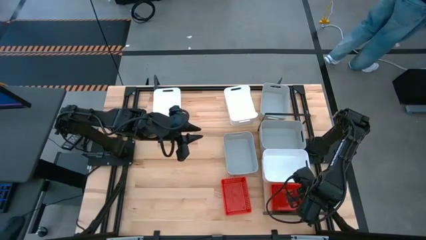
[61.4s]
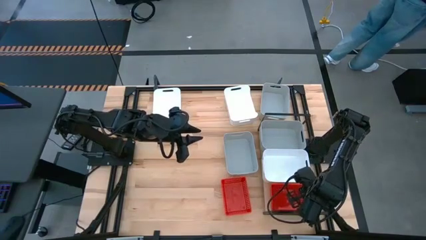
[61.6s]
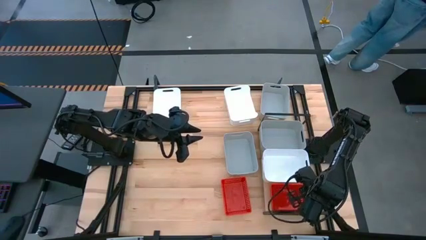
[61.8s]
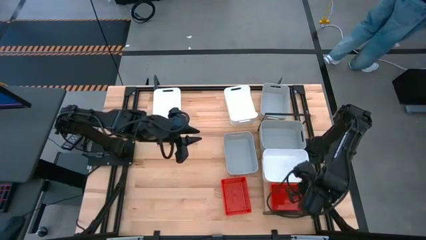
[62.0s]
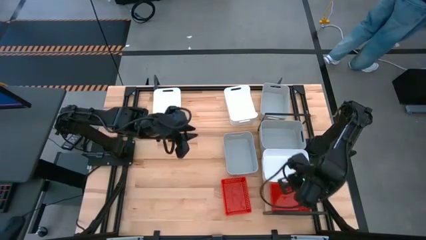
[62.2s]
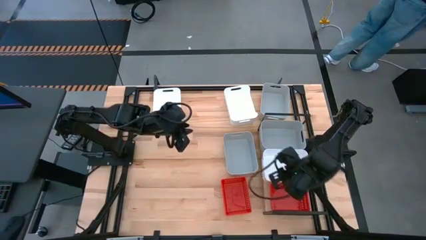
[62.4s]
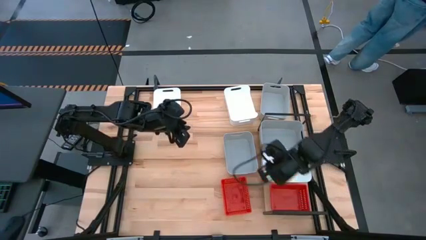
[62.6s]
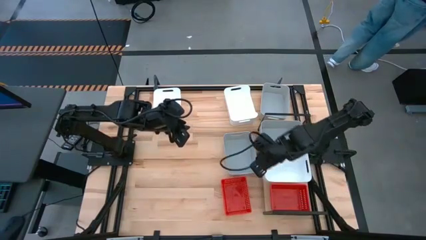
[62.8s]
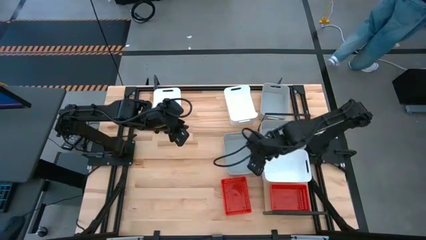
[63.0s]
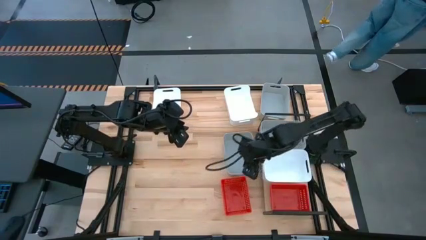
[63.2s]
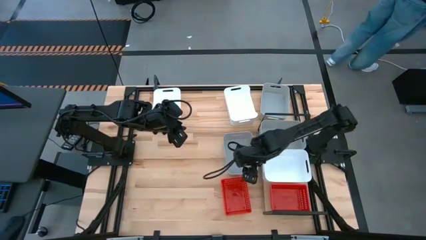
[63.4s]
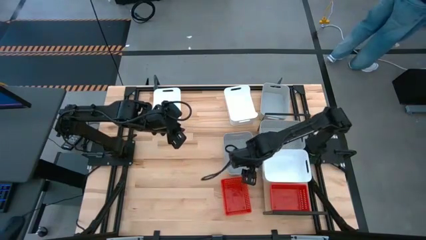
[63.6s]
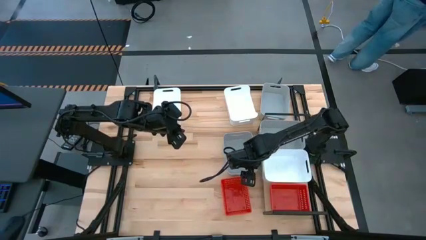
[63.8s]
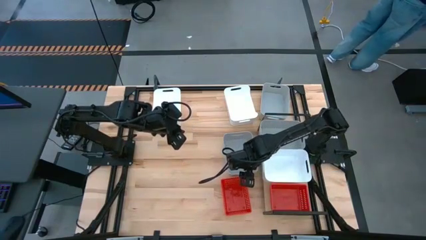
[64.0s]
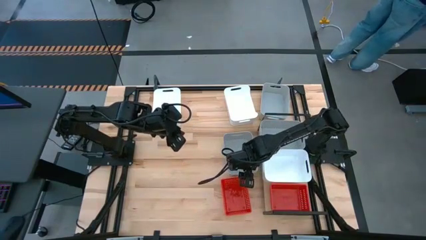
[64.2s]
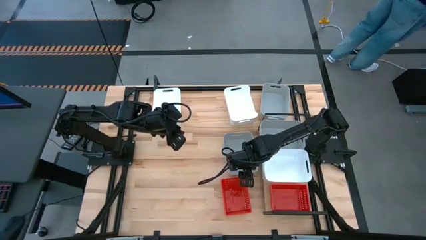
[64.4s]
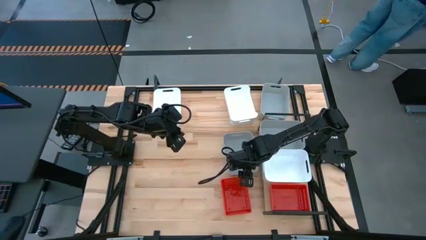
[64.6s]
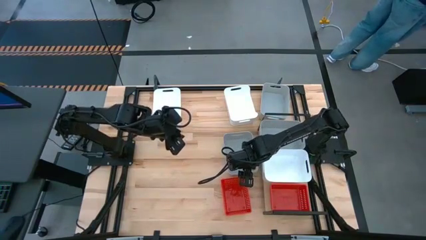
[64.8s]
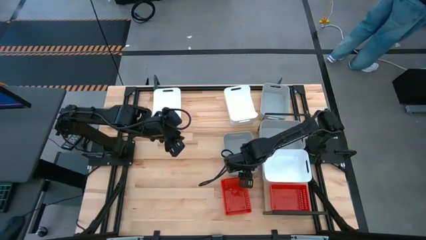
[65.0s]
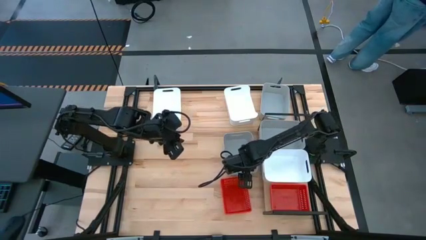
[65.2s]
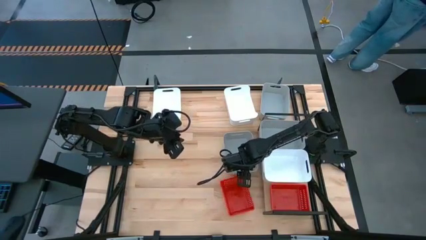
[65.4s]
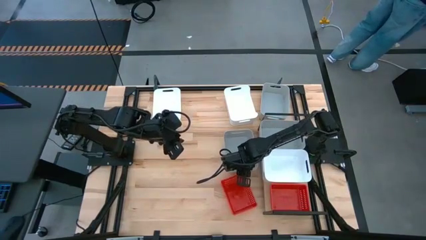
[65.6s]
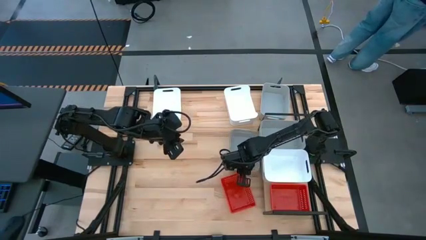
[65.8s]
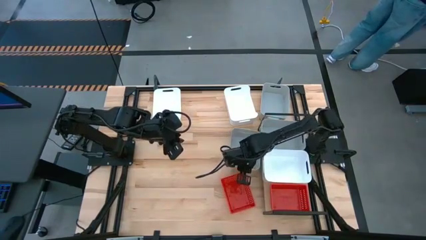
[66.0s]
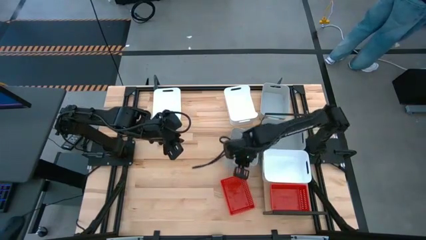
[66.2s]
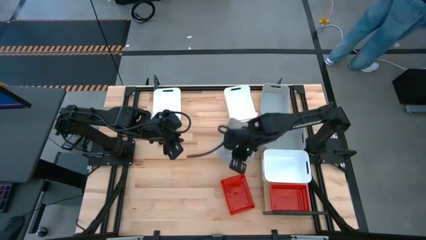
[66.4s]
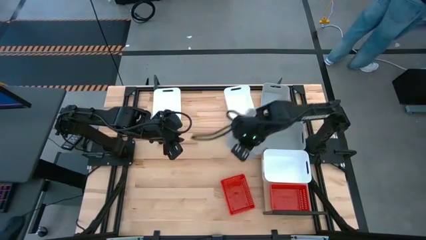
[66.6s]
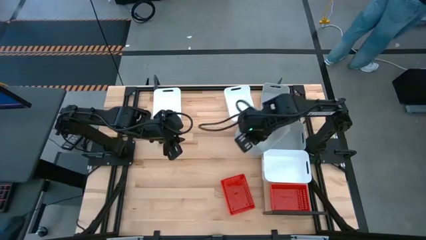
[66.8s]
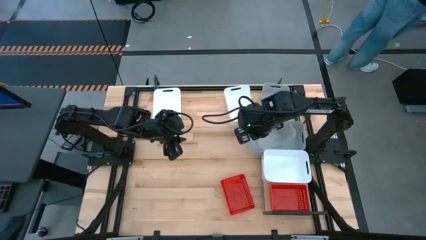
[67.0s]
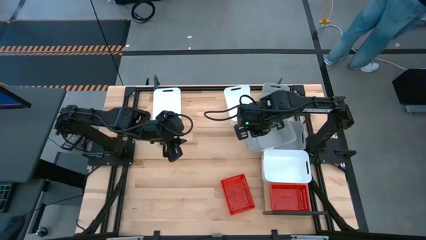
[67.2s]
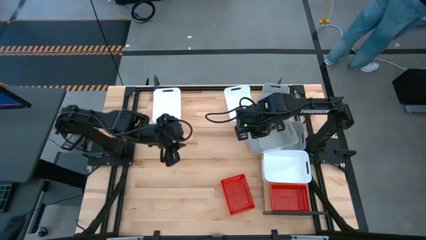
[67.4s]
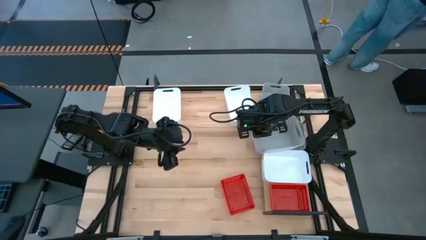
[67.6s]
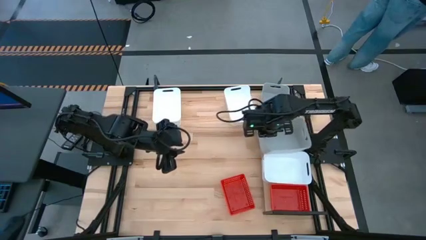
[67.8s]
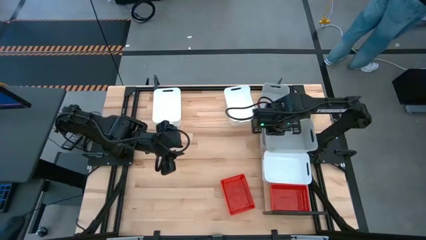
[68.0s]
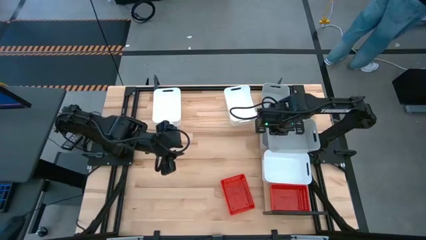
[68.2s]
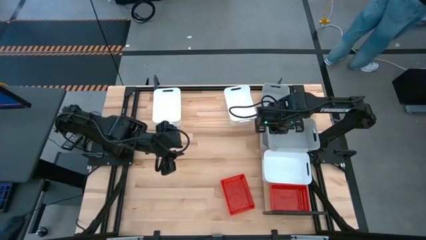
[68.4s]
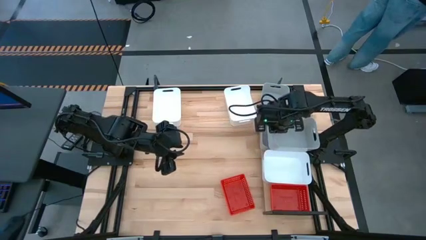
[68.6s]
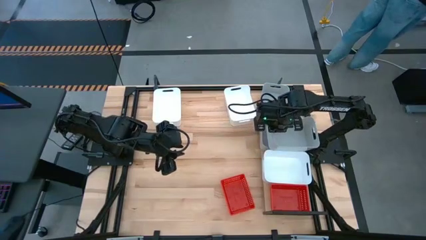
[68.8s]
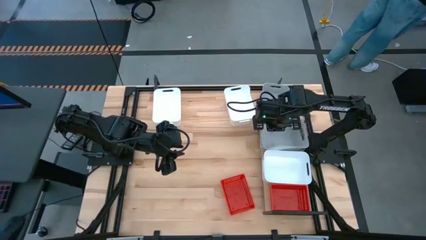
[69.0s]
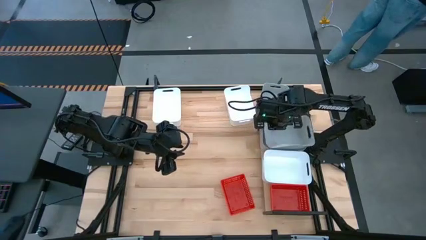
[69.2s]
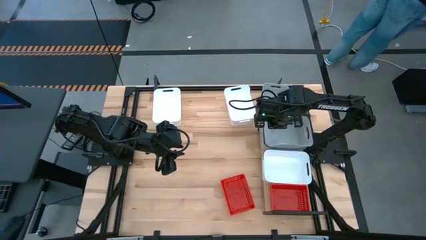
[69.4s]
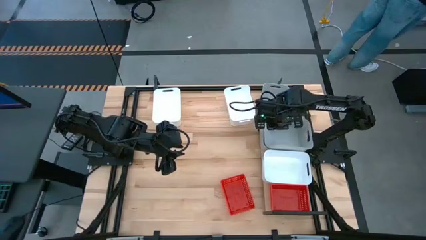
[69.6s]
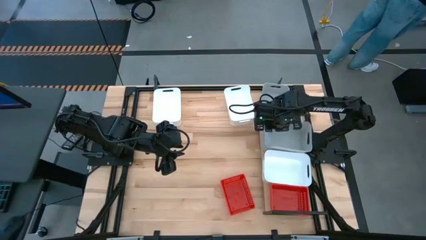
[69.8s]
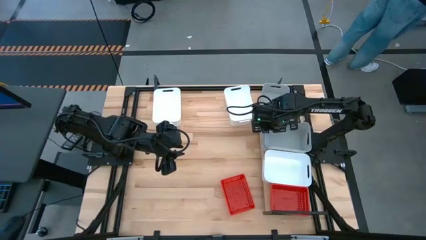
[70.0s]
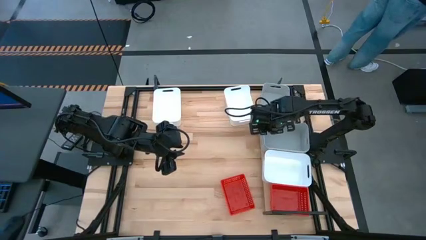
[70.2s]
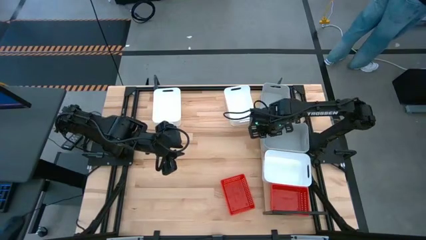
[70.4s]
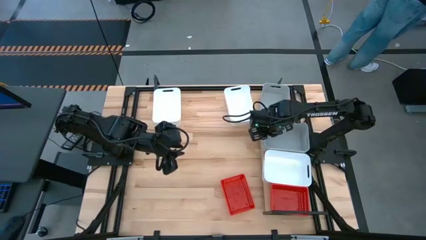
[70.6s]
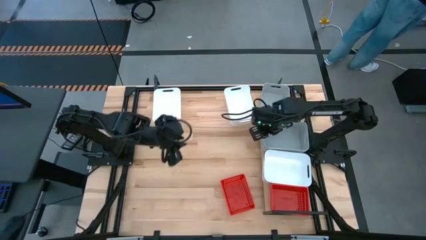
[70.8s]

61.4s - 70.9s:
Task: Stack baskets on shelf by color
Stack the bottom gray bin on top of the gray bin on the shelf
